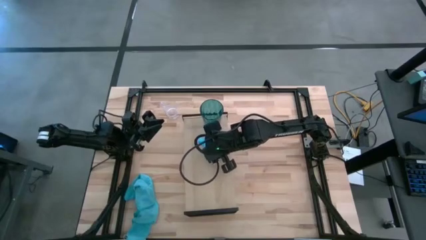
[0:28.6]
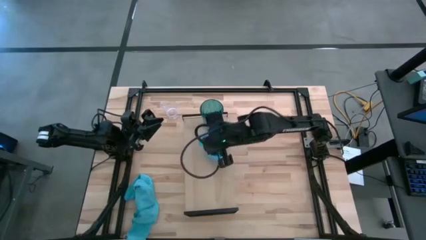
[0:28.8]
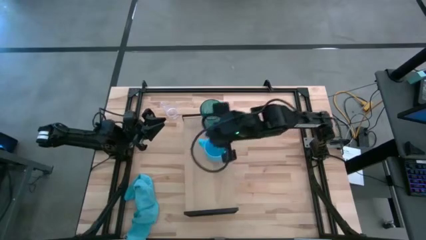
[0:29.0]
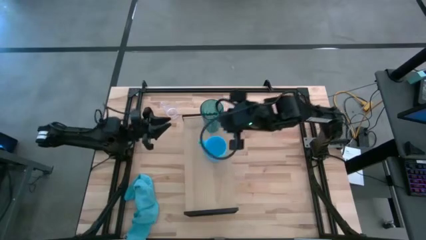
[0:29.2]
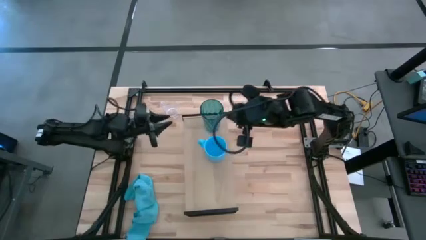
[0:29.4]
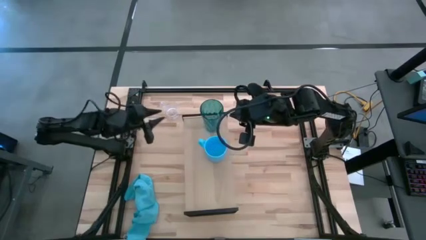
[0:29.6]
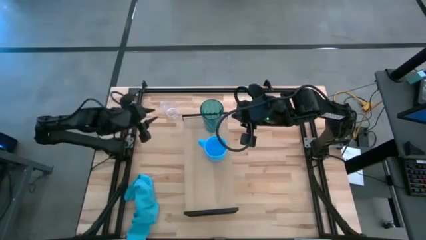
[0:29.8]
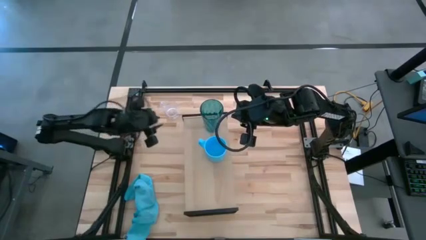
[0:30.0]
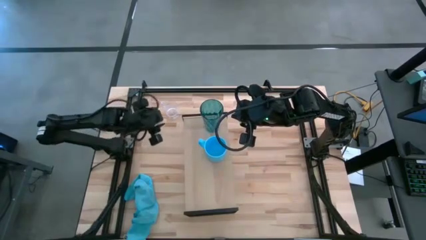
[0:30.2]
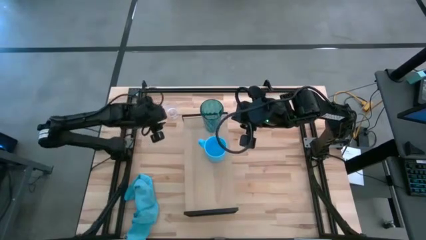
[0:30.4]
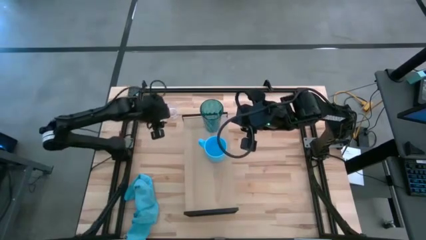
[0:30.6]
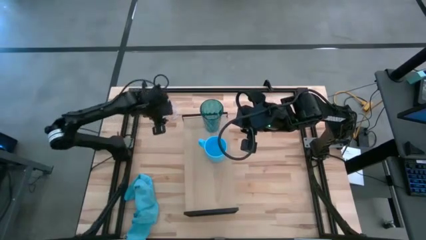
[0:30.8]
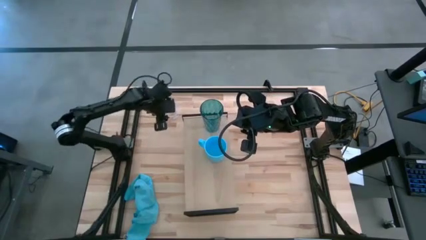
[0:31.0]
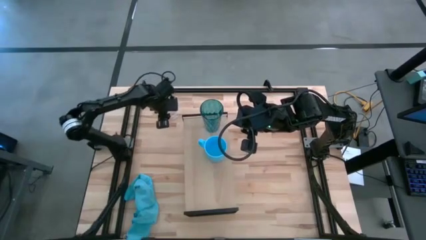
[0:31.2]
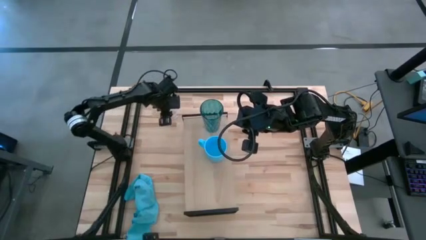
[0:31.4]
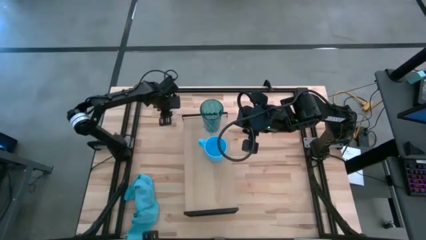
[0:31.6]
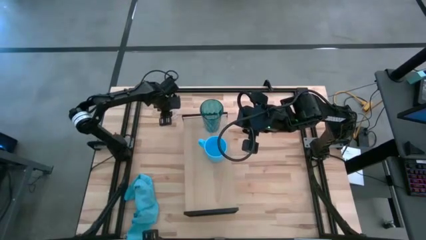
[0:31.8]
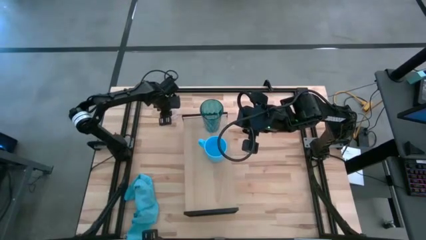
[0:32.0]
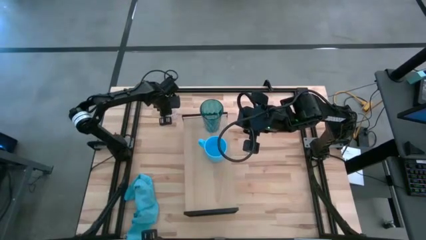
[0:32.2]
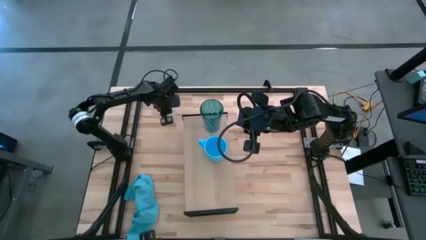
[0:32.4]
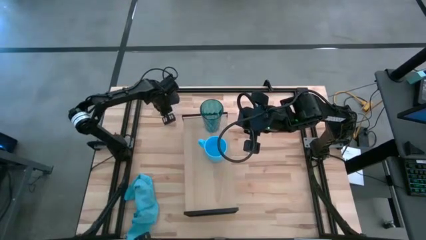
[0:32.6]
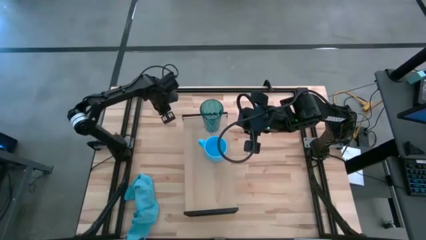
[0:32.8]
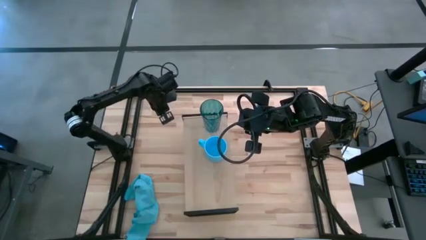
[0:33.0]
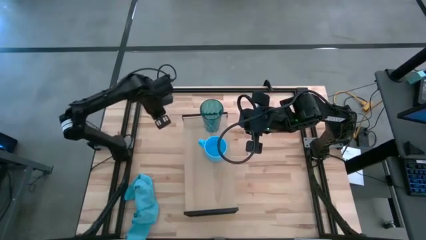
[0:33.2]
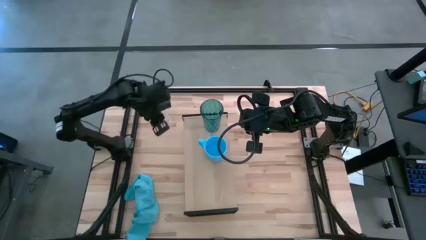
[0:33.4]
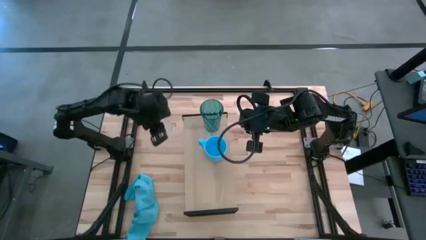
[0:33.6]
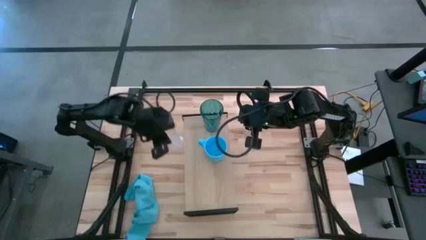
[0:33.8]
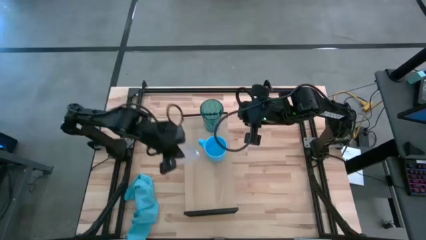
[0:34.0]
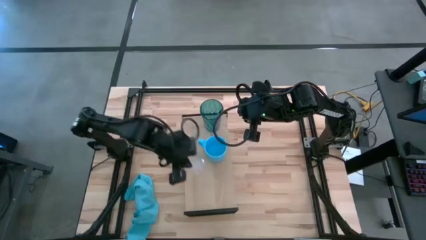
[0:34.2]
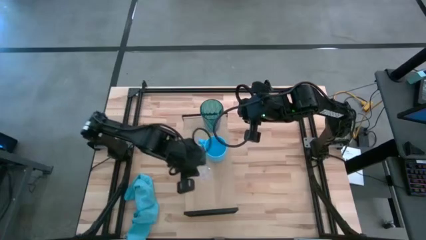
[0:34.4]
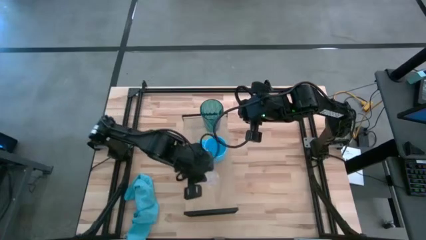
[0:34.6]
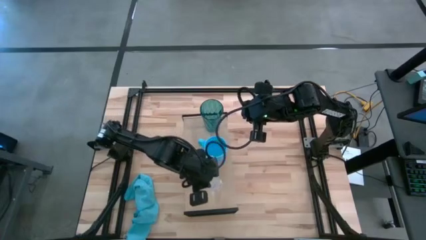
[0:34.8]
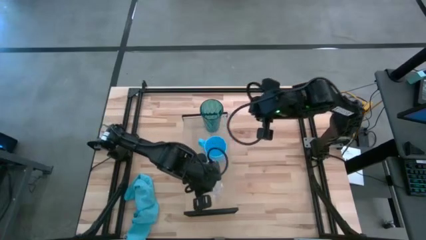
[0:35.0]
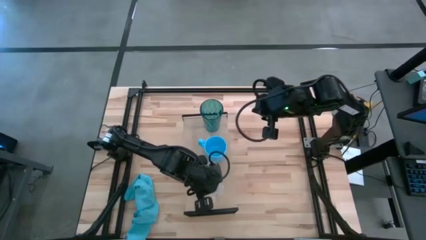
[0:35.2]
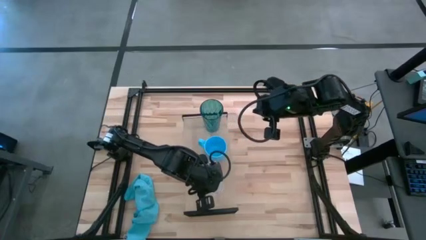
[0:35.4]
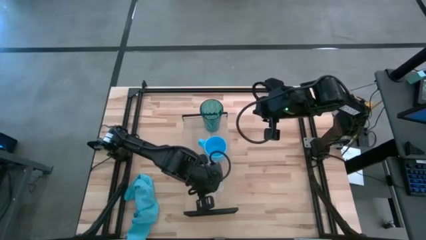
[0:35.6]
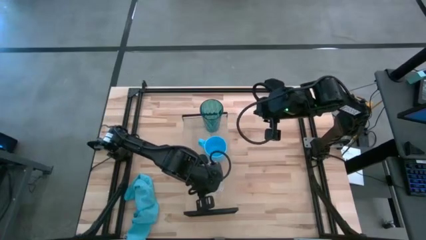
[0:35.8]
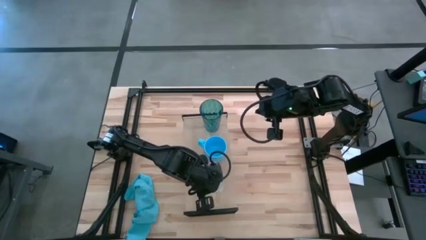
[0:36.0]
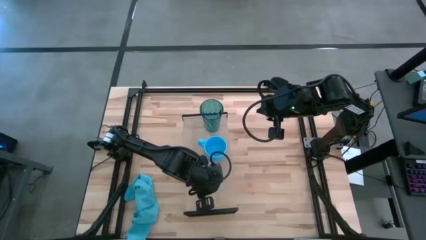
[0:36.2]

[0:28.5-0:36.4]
Task: Stack small to large cups/mugs on shelf
Put the clear mug on the shelf

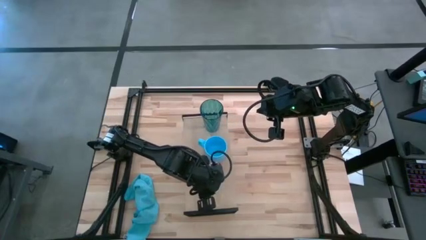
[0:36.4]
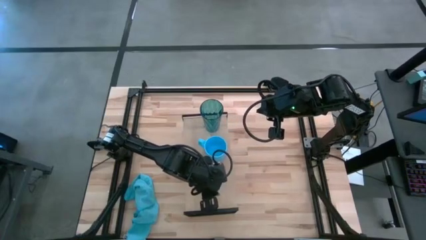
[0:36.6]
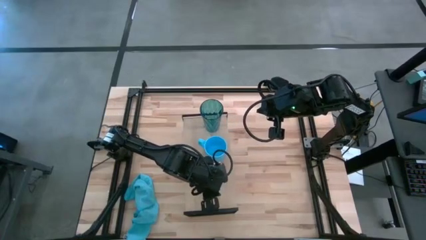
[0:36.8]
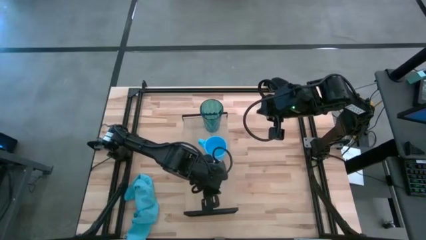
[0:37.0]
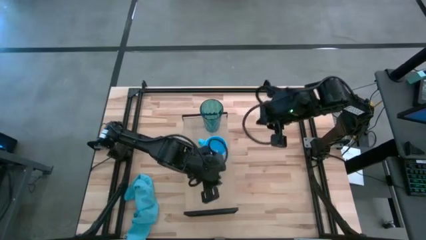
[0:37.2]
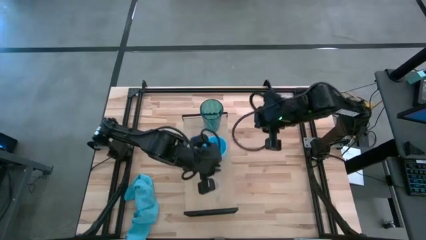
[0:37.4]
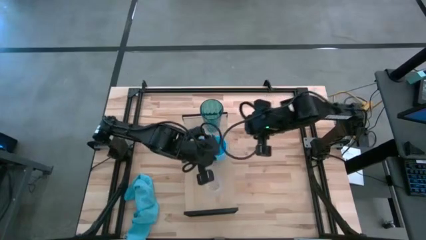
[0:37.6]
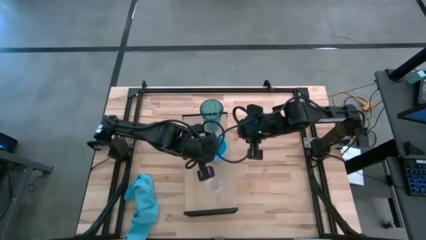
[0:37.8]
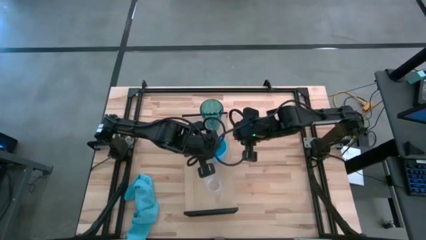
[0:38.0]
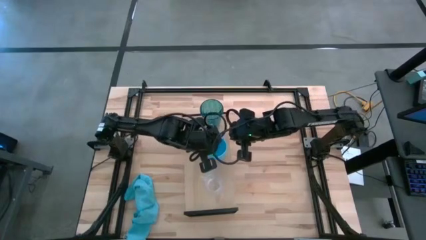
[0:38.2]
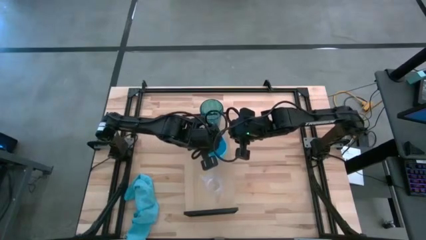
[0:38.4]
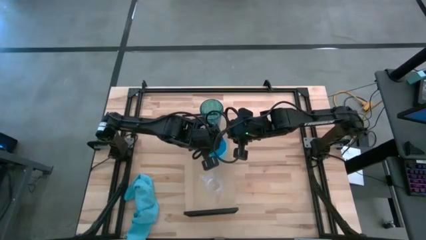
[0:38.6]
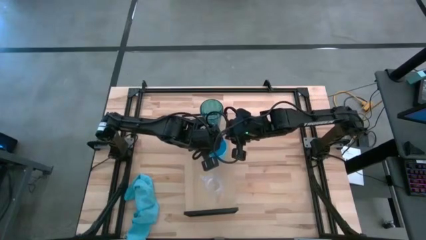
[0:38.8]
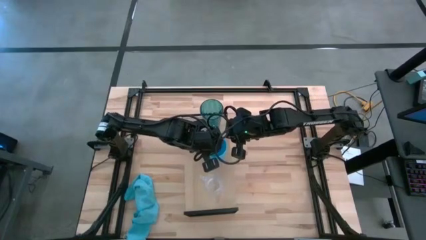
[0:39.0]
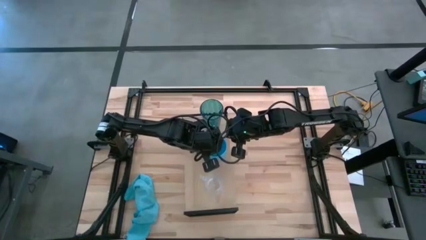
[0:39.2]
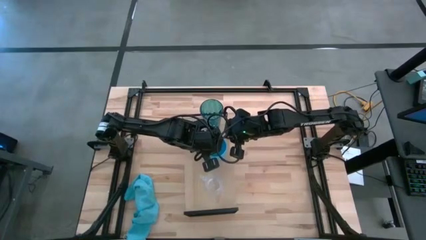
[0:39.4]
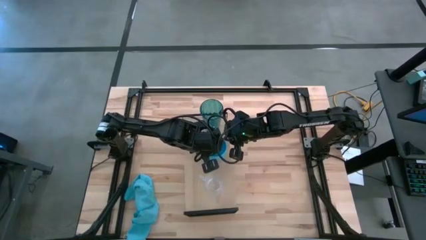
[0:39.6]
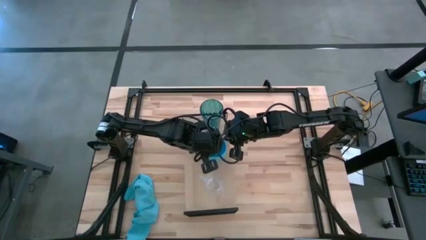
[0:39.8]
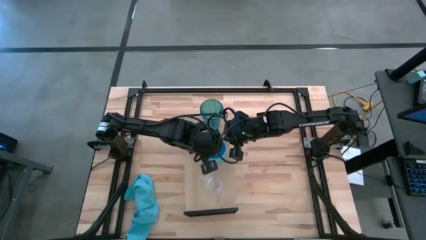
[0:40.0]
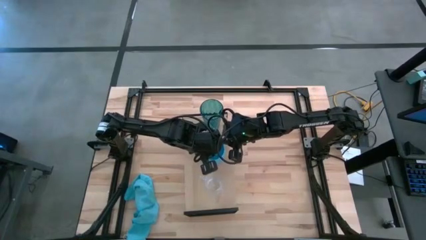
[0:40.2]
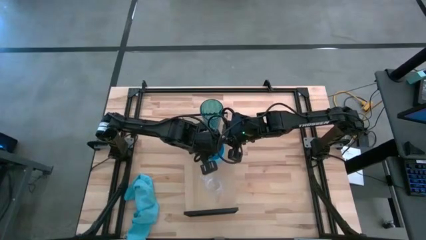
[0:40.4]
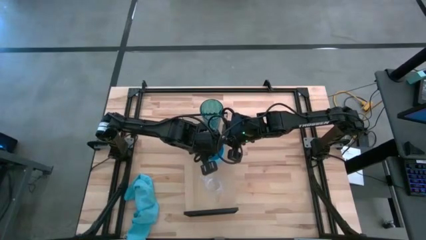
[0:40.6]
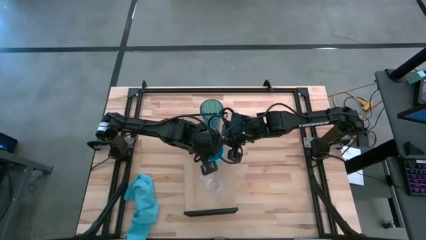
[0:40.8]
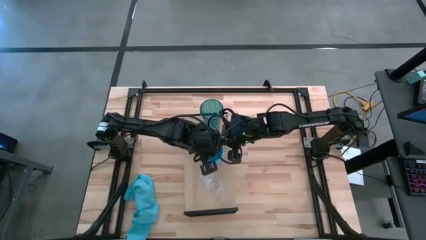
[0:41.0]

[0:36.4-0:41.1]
Adjust the light blue mug
